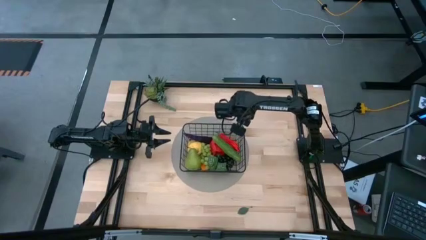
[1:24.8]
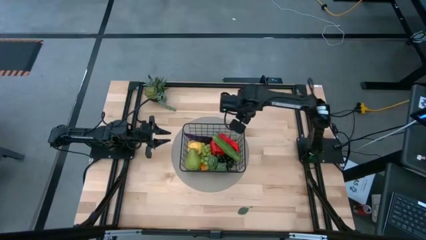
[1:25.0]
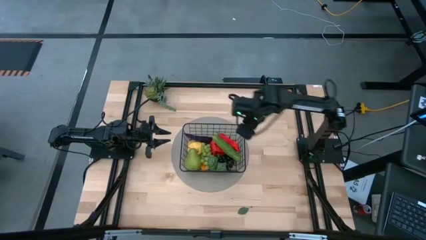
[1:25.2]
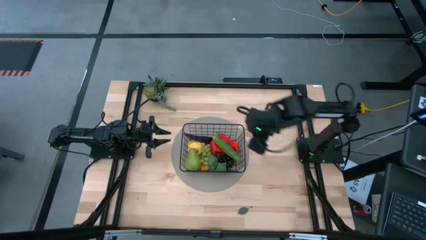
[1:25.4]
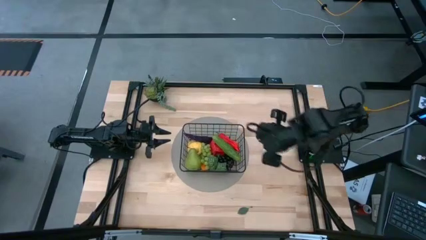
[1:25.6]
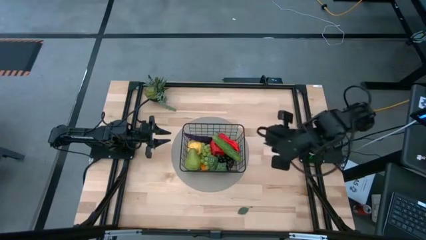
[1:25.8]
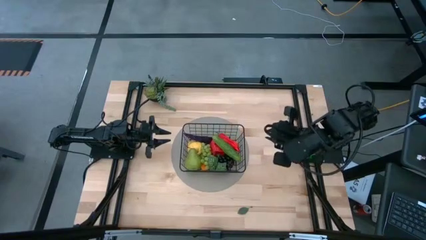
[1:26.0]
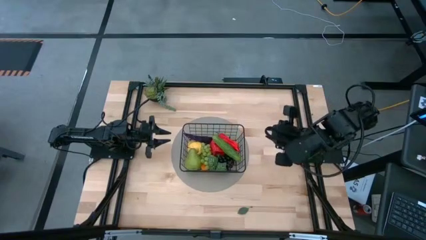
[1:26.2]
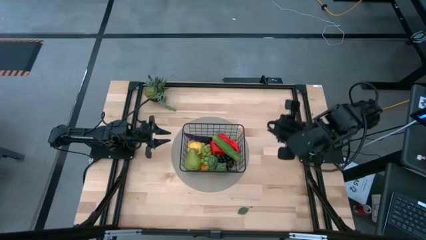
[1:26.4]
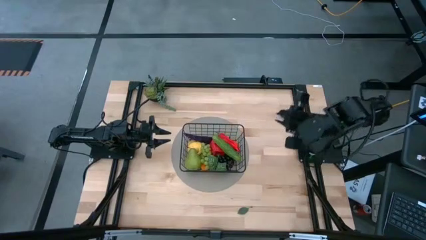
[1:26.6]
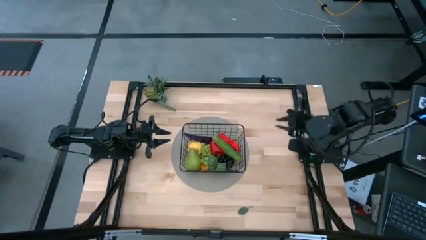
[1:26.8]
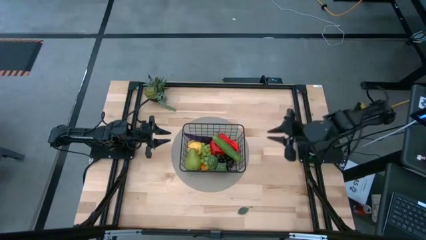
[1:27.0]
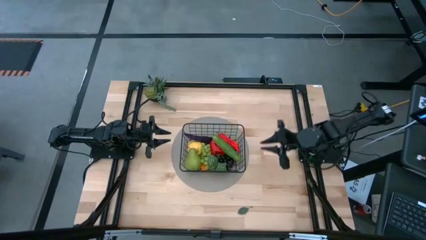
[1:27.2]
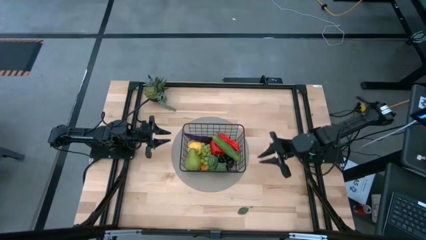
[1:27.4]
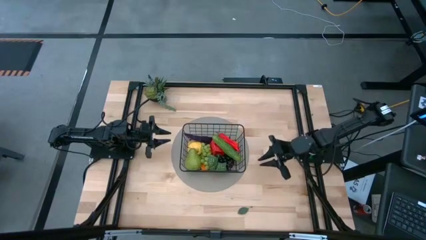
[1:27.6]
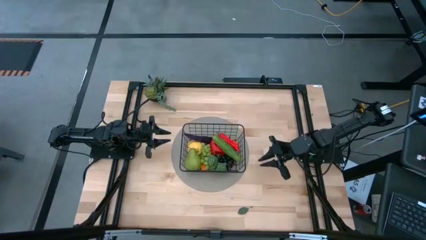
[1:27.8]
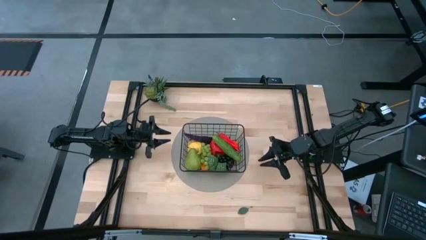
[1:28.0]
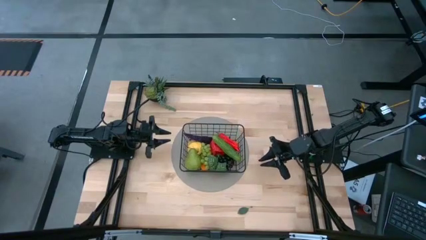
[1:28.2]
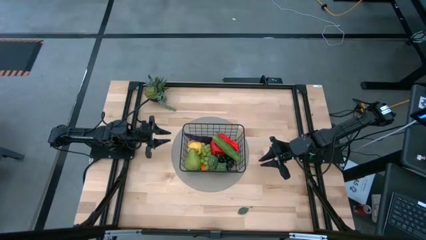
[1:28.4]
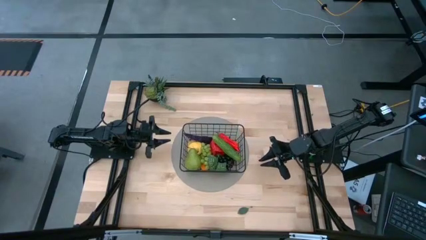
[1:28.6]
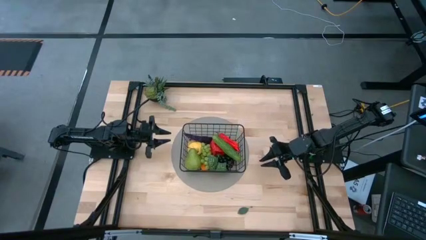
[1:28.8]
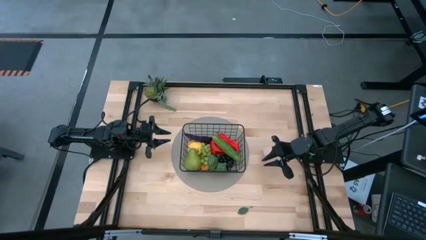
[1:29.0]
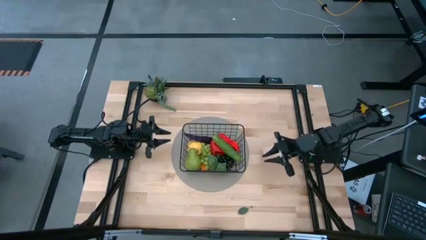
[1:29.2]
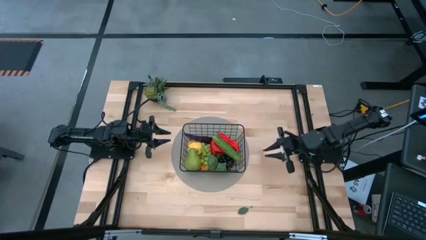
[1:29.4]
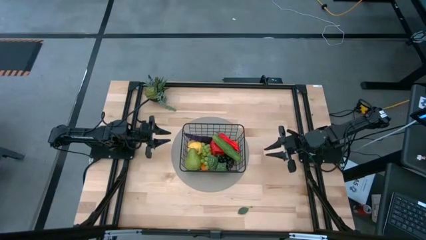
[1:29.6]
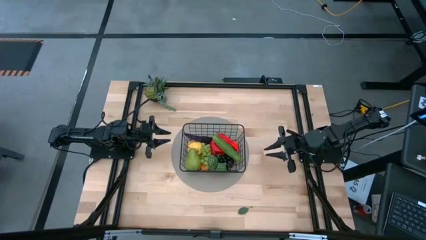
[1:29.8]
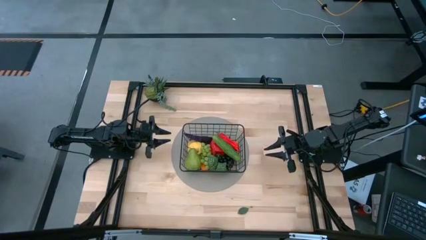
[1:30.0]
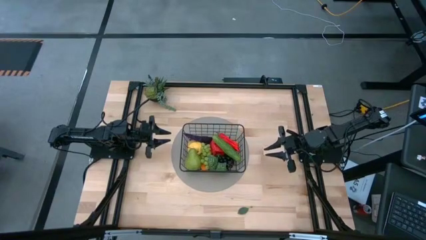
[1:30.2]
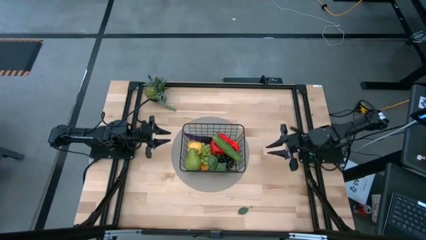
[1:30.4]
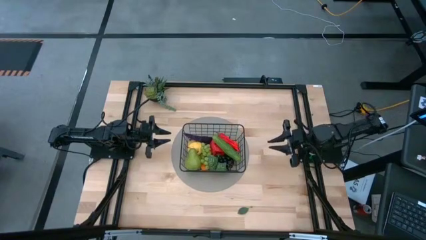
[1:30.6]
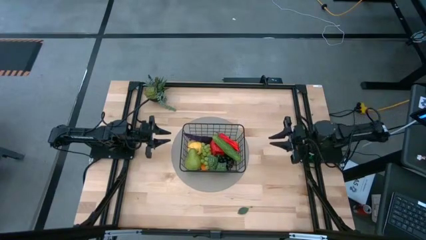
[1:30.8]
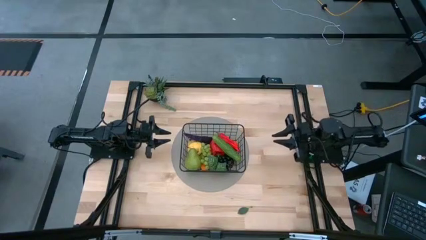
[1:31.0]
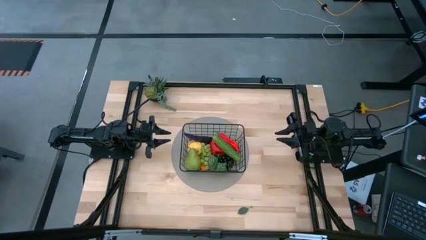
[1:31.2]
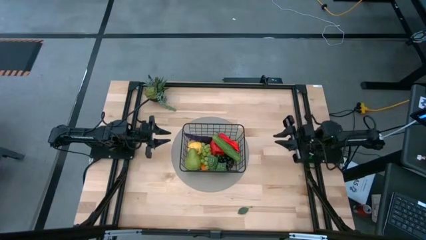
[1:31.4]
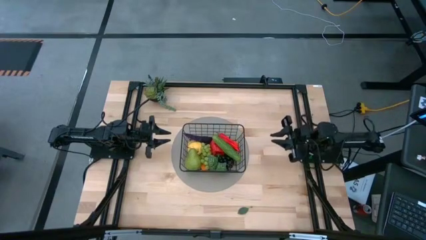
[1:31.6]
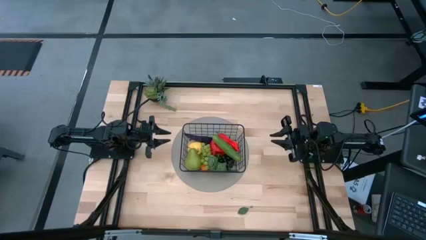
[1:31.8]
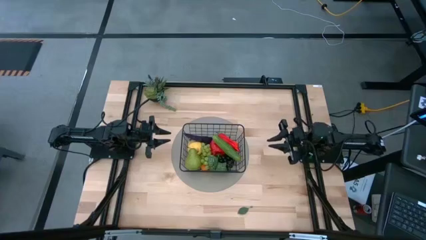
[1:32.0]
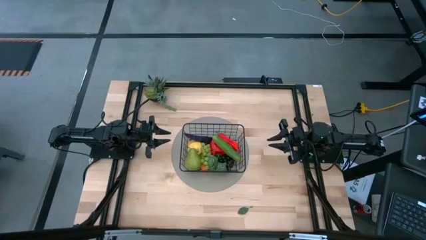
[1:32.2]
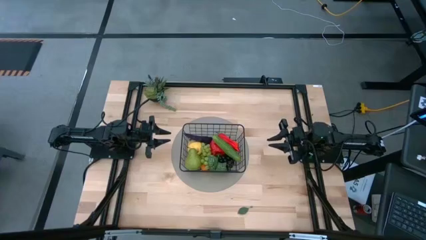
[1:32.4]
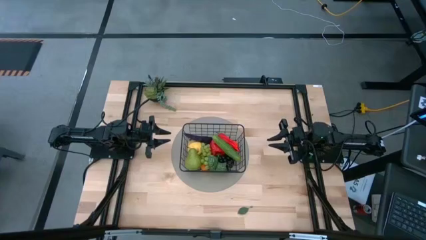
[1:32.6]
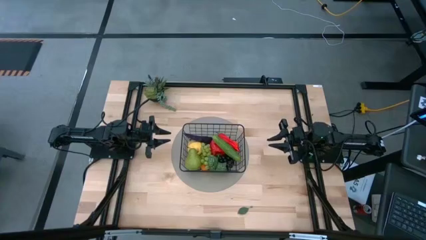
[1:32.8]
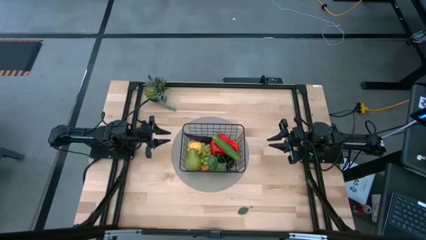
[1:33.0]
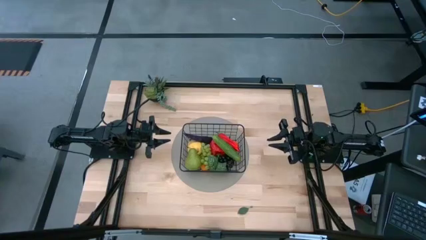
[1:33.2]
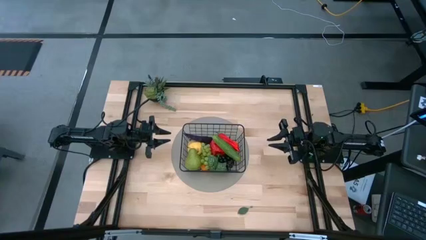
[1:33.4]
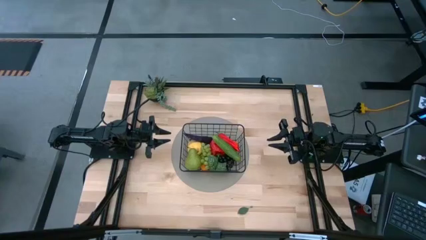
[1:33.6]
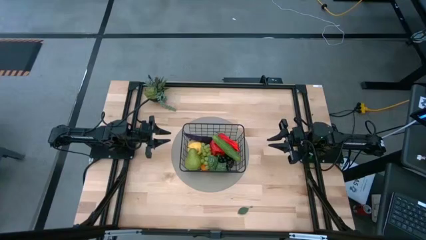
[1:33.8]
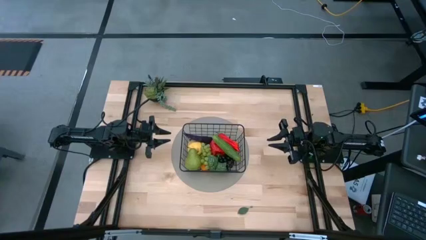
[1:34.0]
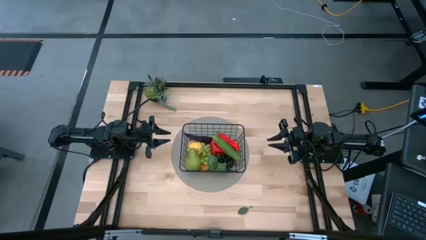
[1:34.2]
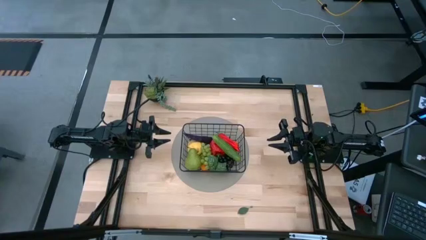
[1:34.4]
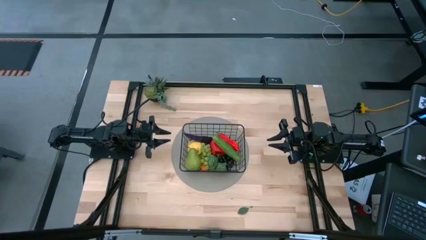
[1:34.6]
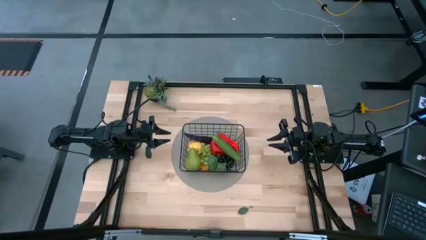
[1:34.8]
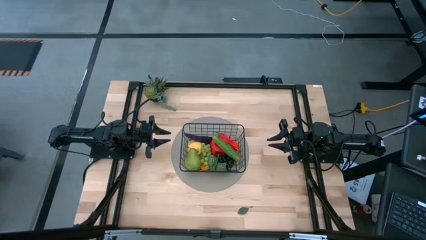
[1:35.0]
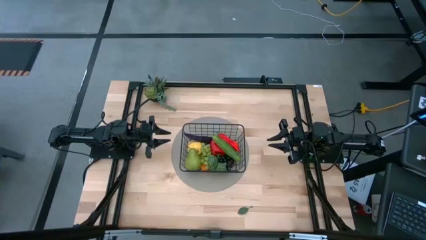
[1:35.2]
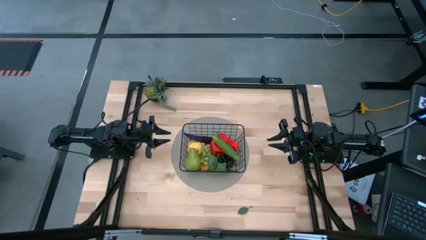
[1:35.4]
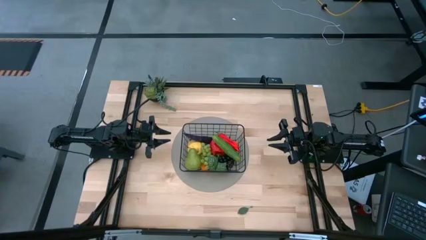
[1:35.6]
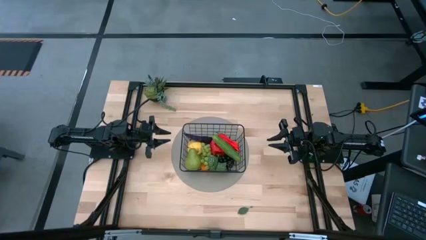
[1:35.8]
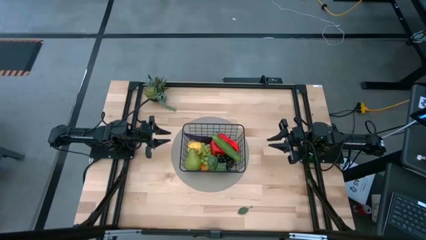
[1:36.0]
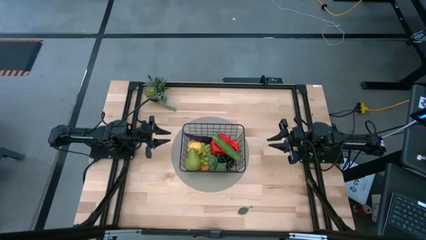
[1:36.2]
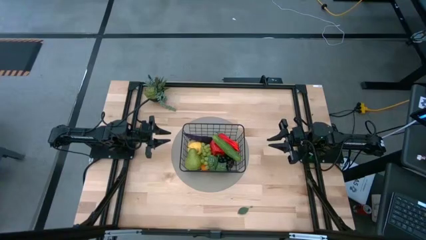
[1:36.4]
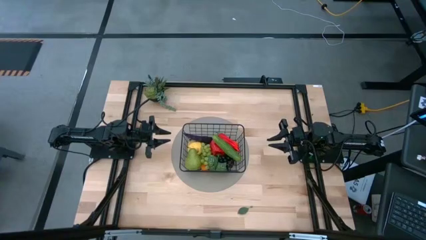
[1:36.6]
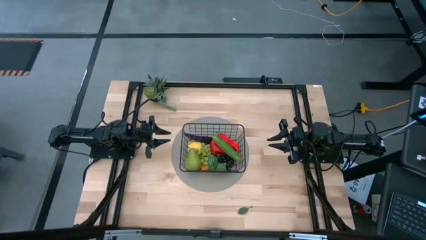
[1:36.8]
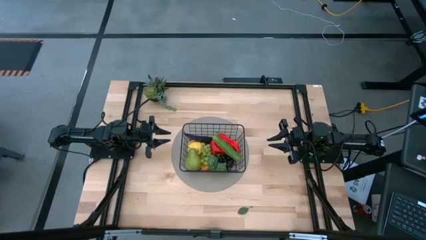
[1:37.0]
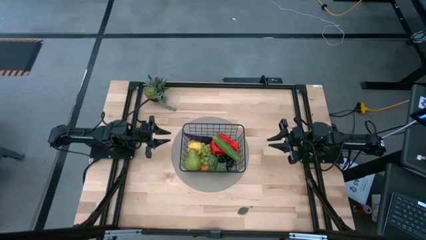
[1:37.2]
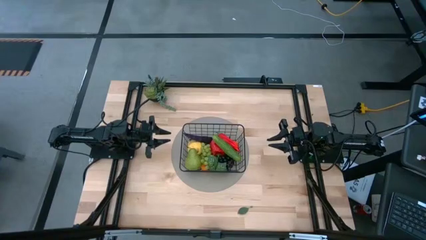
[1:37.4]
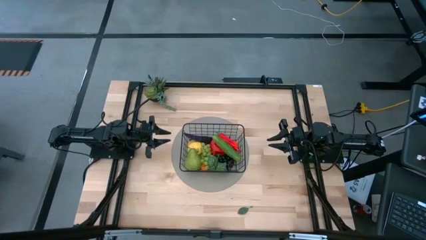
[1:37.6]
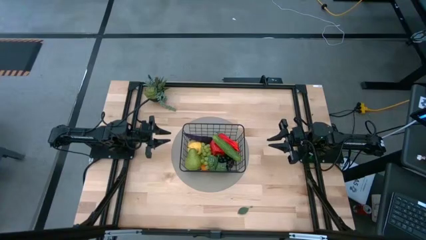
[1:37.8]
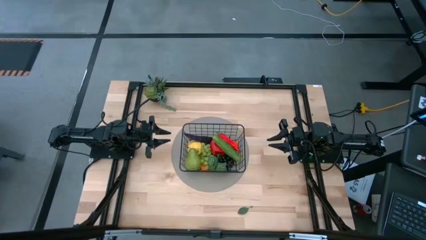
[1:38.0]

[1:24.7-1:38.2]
Task: Build produce basket
Return to Home Position
